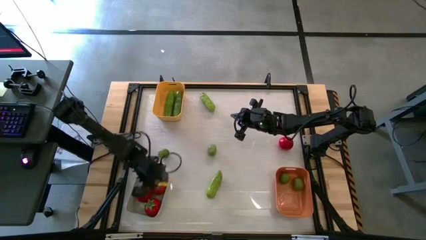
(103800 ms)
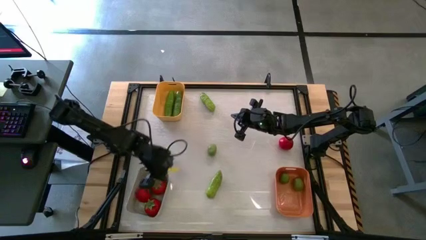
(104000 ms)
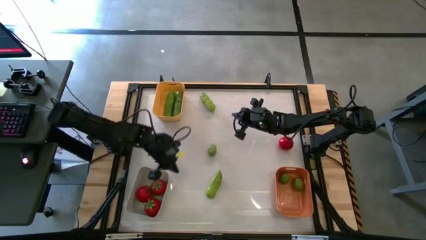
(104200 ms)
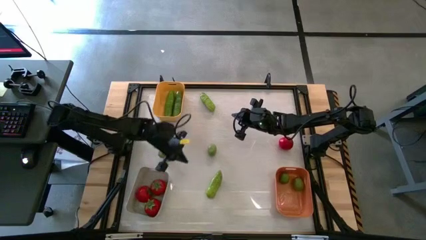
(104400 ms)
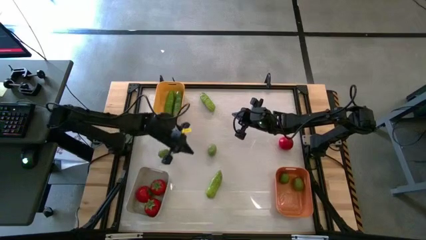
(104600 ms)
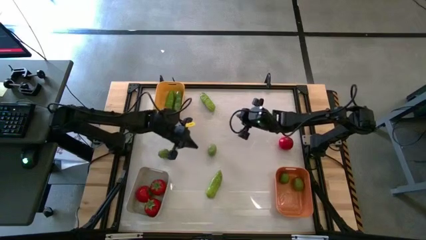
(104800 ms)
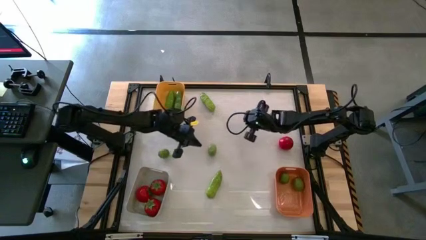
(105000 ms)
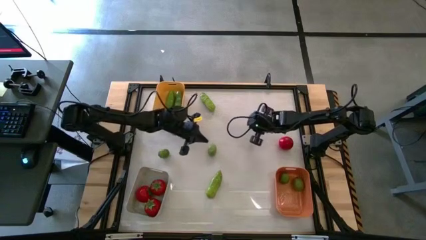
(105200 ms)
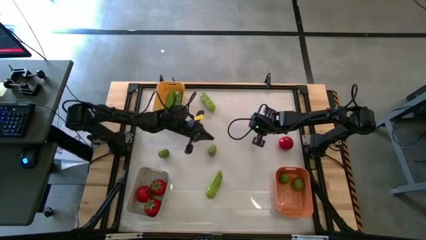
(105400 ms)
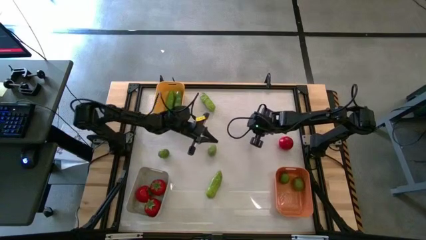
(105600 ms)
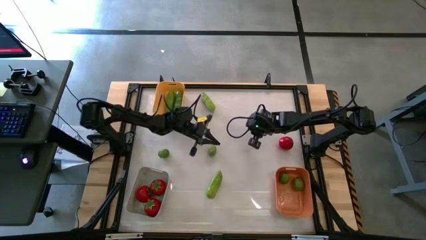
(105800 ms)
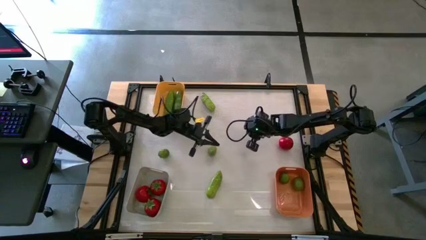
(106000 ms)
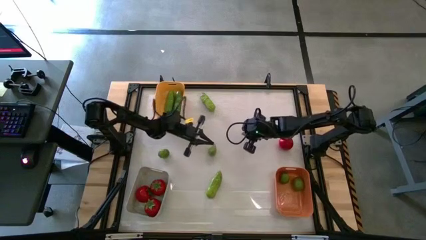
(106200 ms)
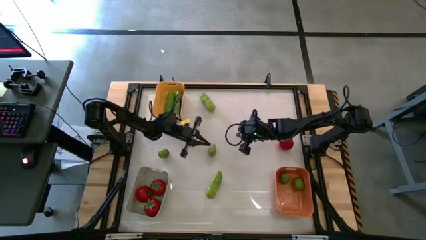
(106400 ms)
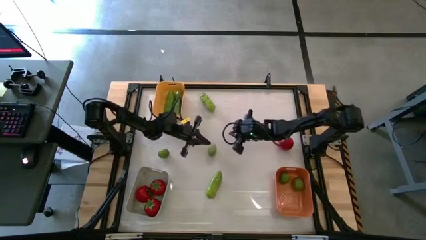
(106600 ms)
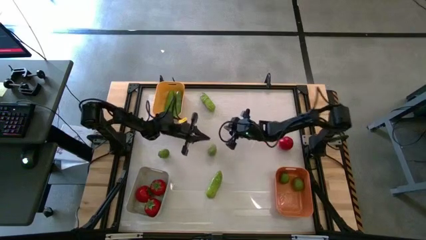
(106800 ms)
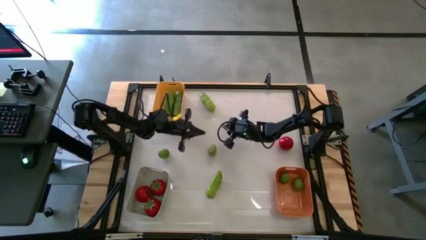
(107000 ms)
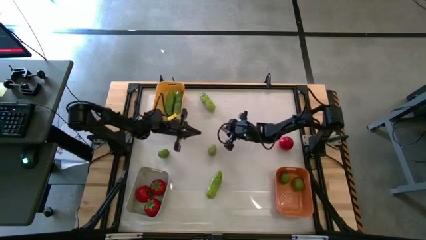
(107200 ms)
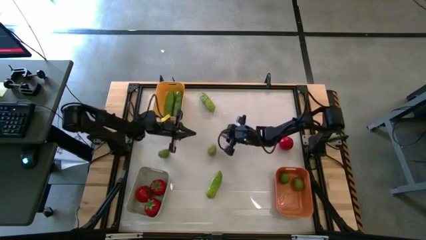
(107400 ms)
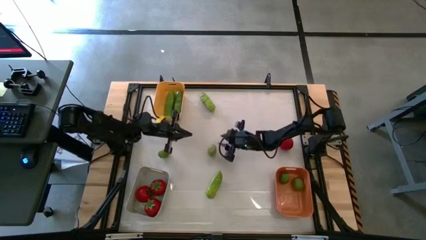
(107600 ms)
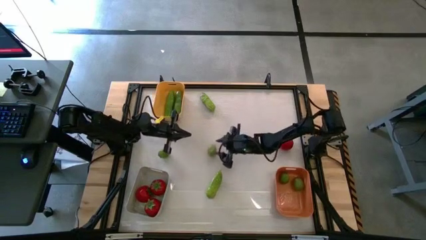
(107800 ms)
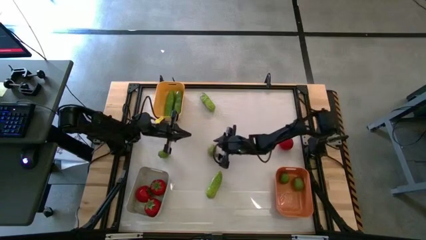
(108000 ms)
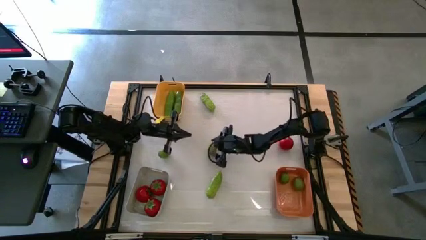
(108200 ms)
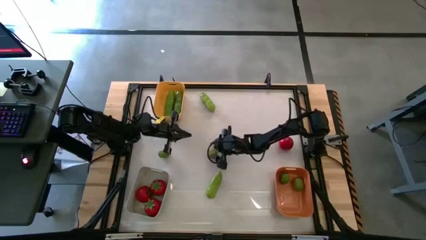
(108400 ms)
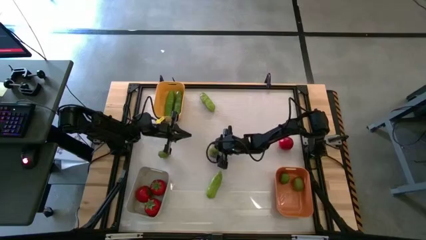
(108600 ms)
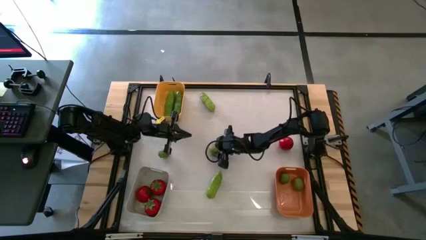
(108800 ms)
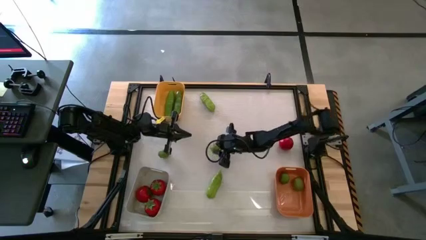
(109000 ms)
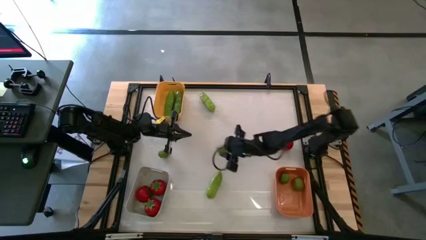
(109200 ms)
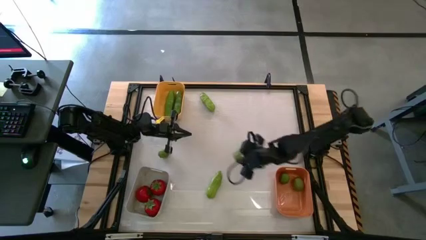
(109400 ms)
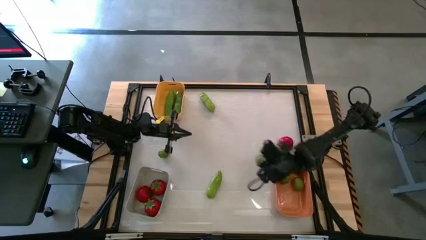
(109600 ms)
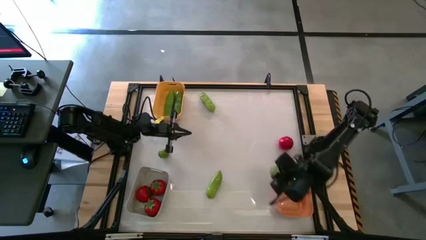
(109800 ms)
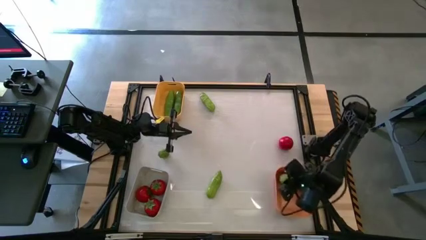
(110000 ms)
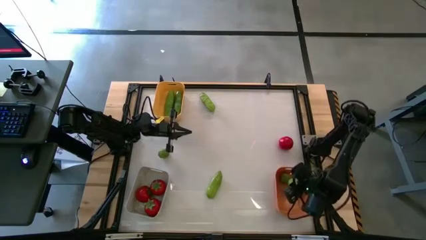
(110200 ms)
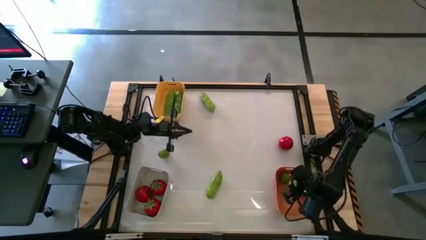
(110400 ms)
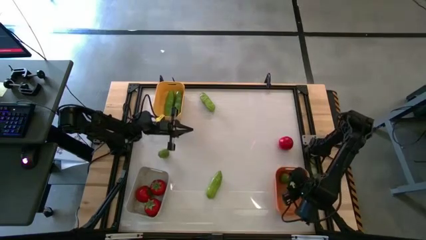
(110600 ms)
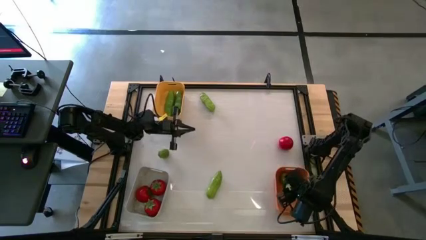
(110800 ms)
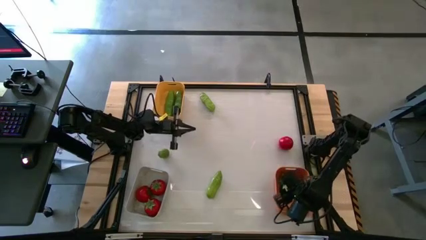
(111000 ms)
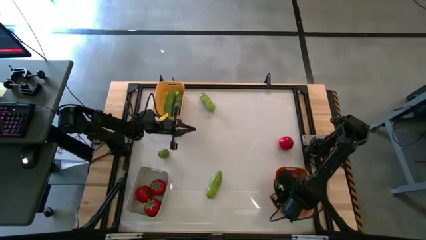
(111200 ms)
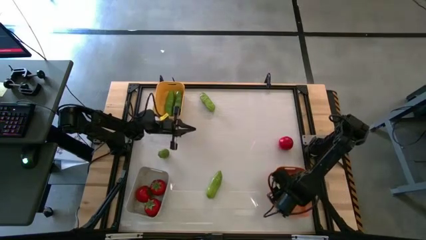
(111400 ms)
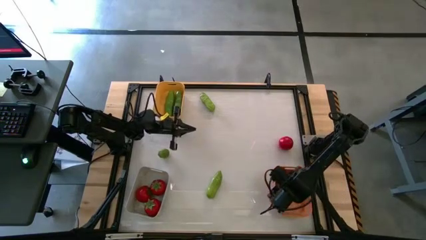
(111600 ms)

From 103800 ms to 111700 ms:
Task: Sort produce into baskets
Put the green lime into the orange bin

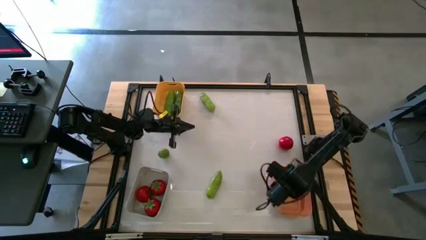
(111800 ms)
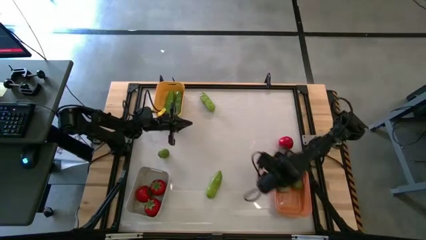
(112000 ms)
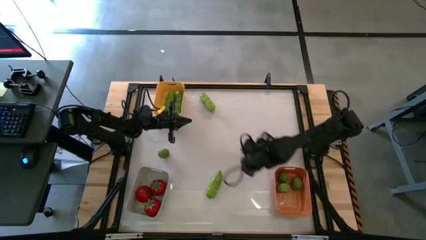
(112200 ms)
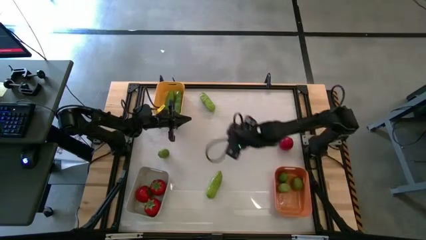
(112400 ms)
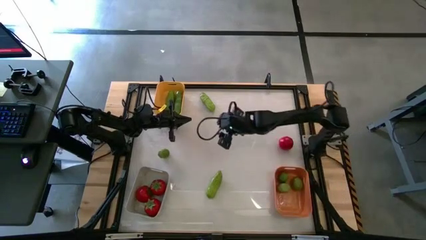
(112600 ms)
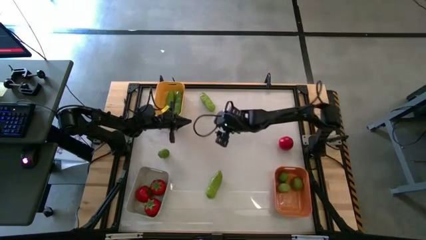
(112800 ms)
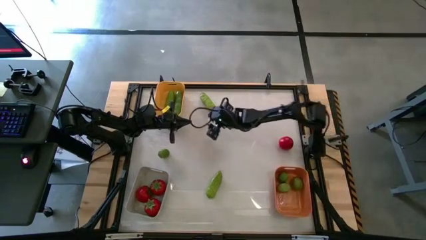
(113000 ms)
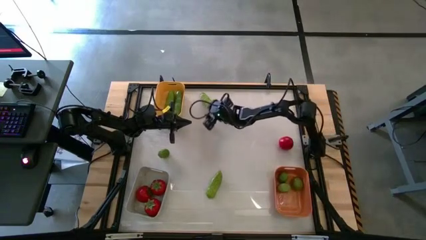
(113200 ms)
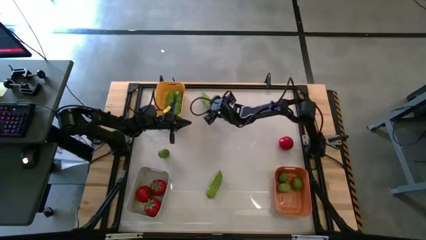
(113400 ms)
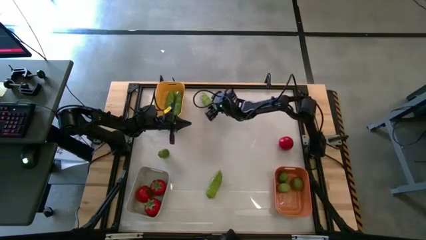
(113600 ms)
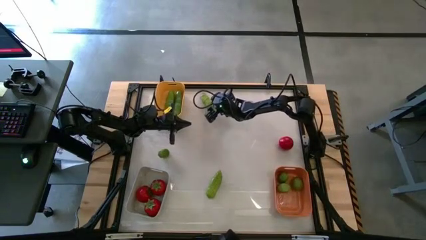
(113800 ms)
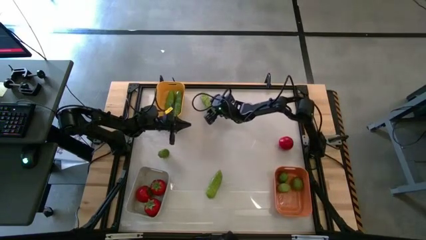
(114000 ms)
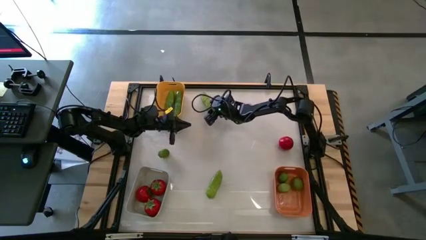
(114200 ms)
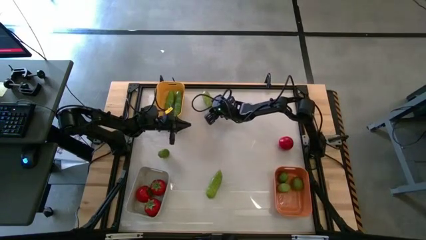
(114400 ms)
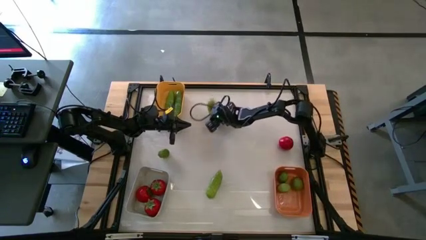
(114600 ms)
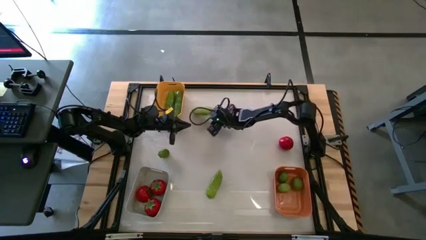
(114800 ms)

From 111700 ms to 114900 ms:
Put the green cucumber into the yellow bin
